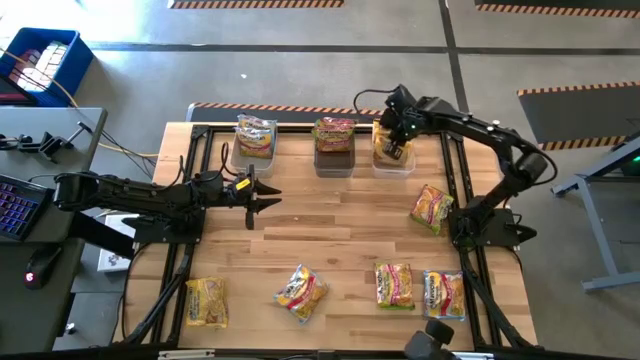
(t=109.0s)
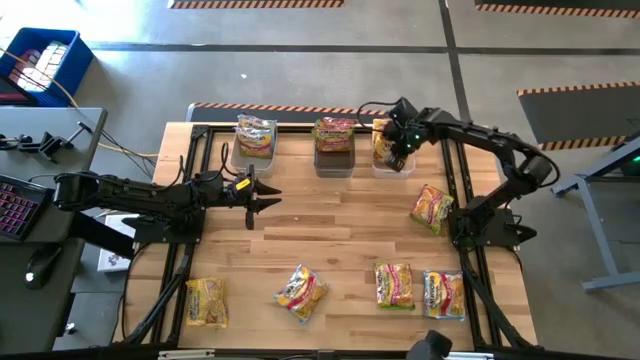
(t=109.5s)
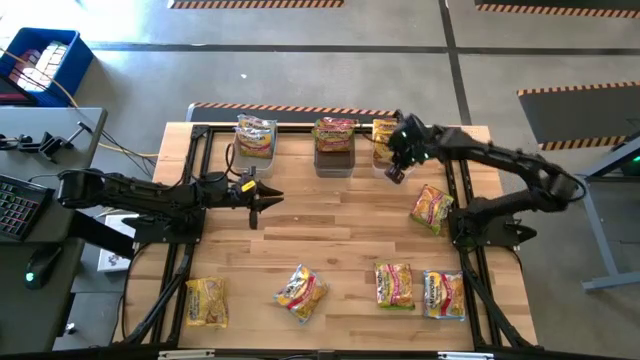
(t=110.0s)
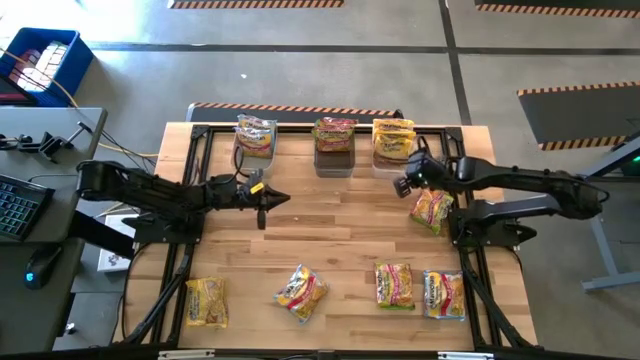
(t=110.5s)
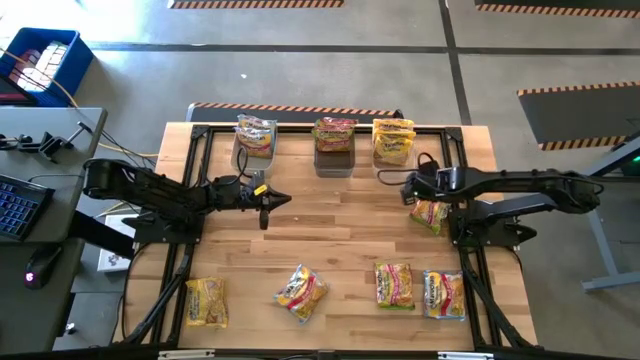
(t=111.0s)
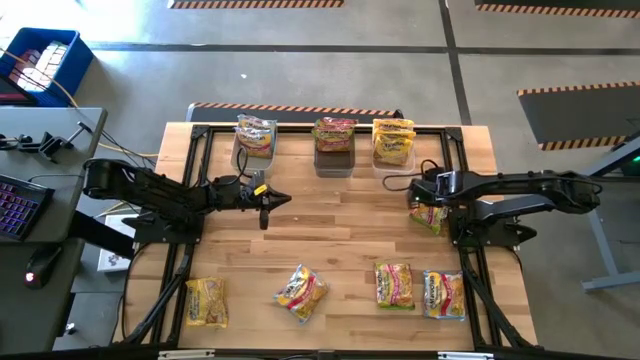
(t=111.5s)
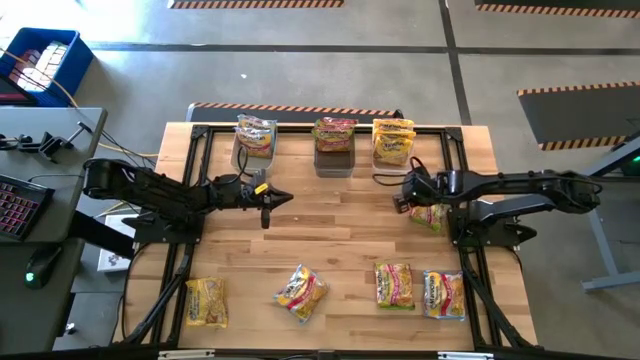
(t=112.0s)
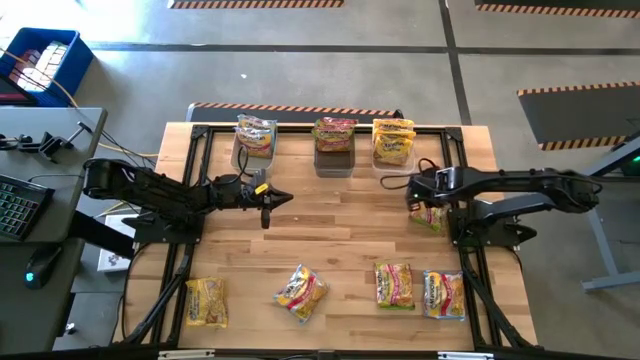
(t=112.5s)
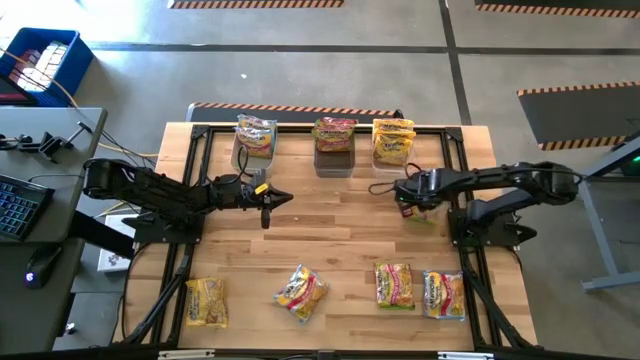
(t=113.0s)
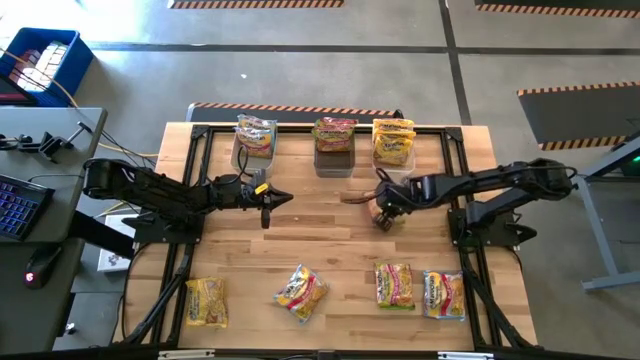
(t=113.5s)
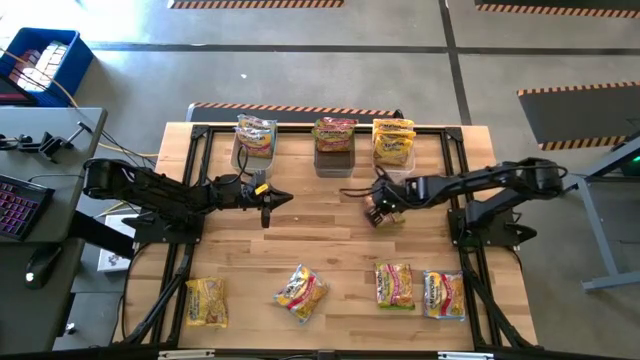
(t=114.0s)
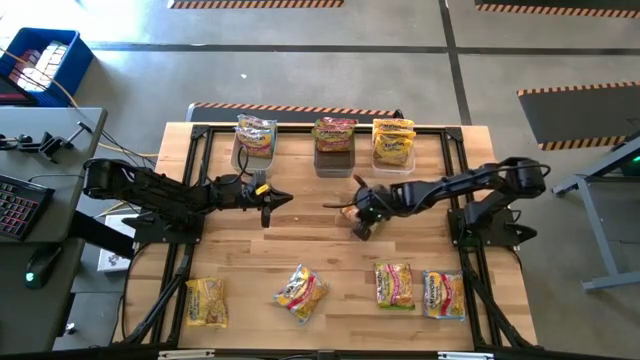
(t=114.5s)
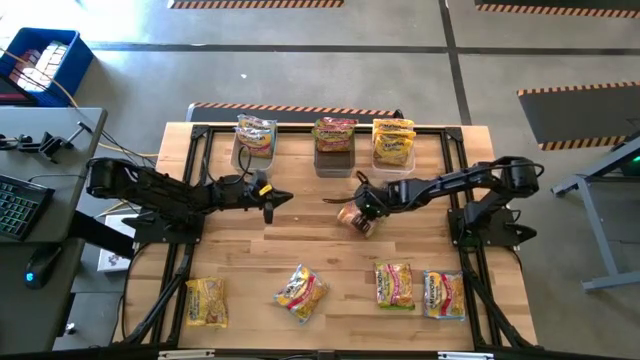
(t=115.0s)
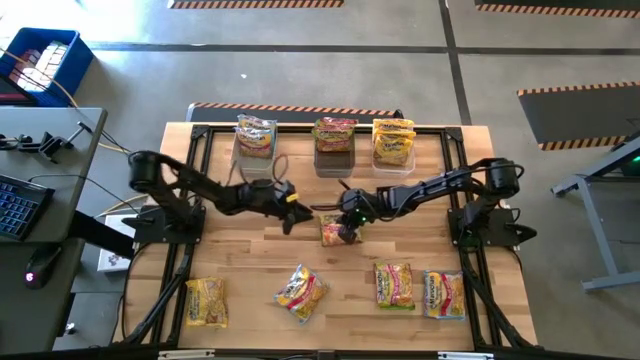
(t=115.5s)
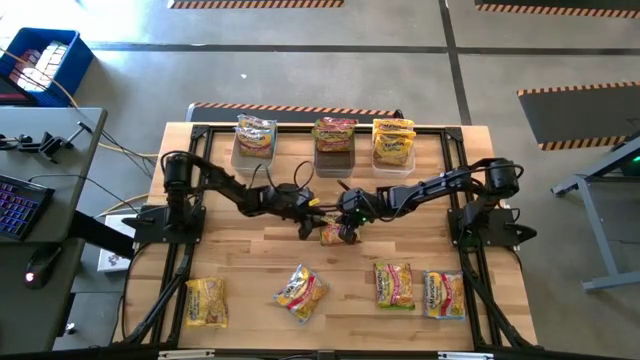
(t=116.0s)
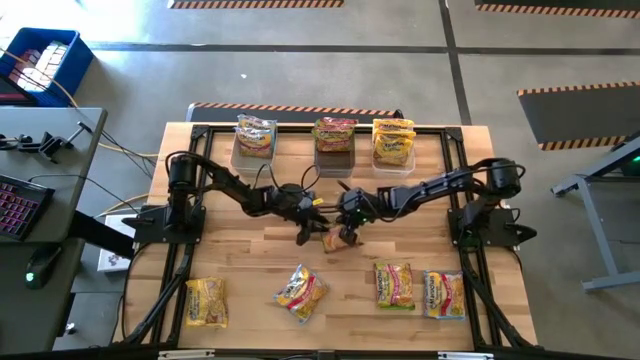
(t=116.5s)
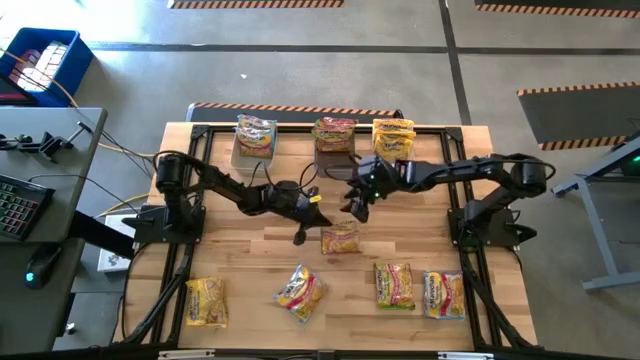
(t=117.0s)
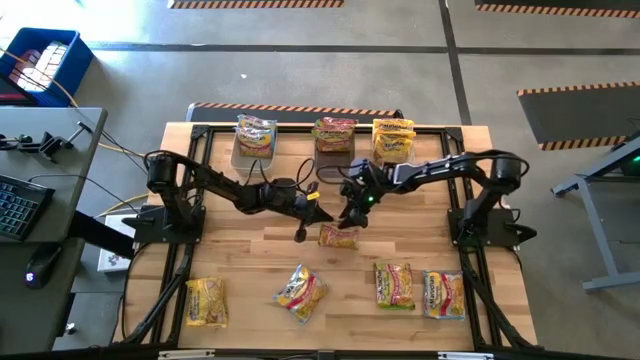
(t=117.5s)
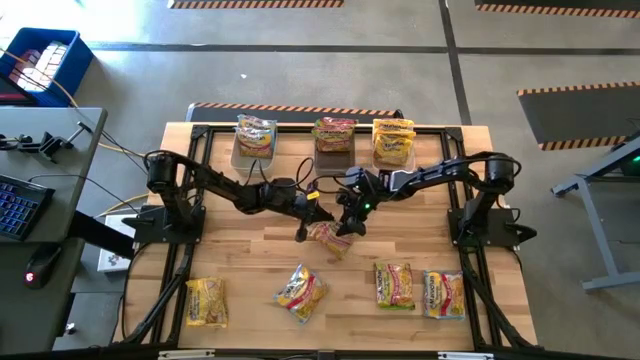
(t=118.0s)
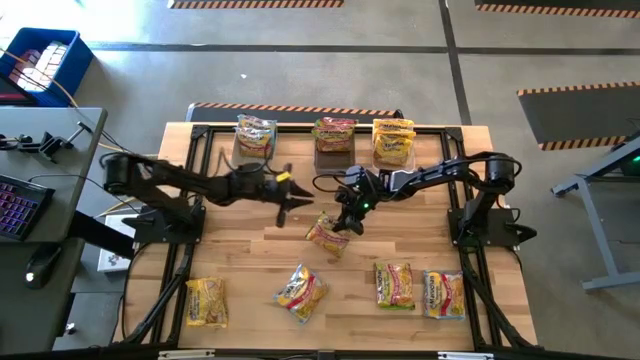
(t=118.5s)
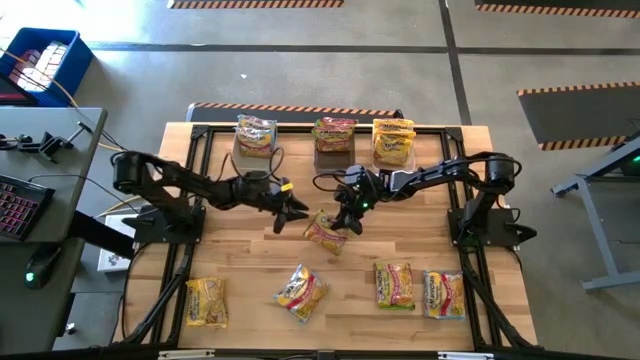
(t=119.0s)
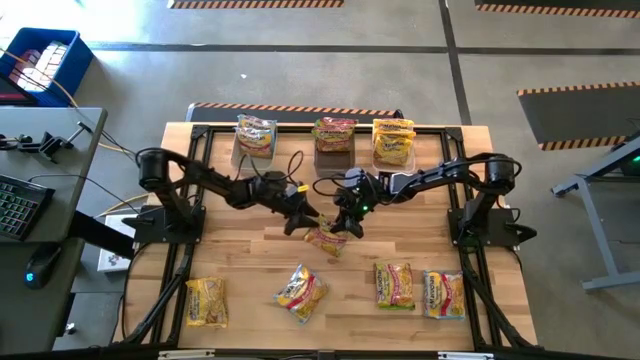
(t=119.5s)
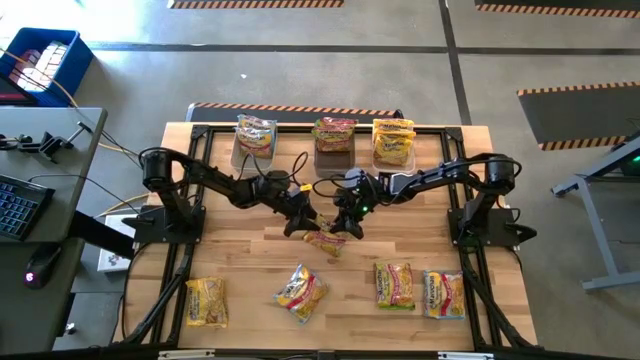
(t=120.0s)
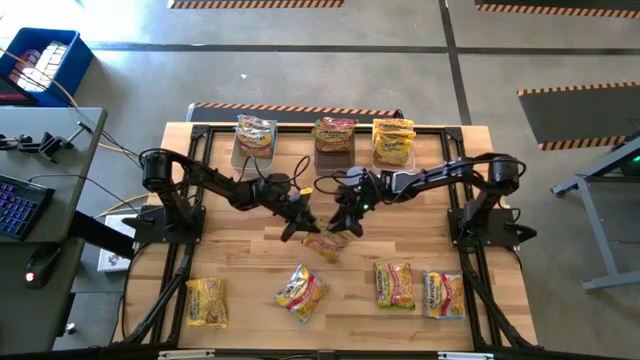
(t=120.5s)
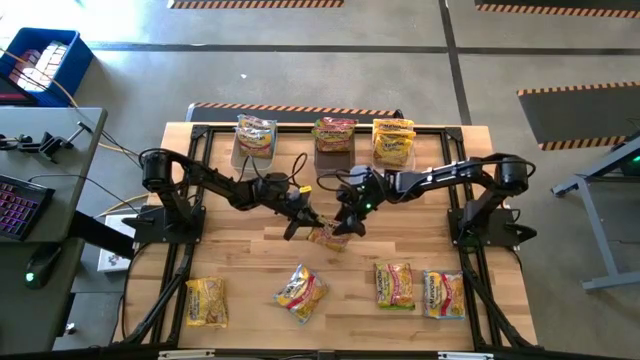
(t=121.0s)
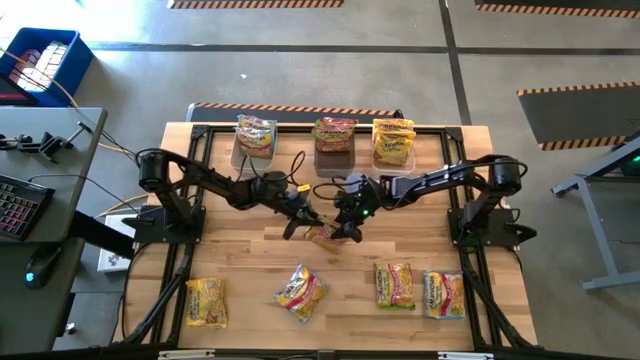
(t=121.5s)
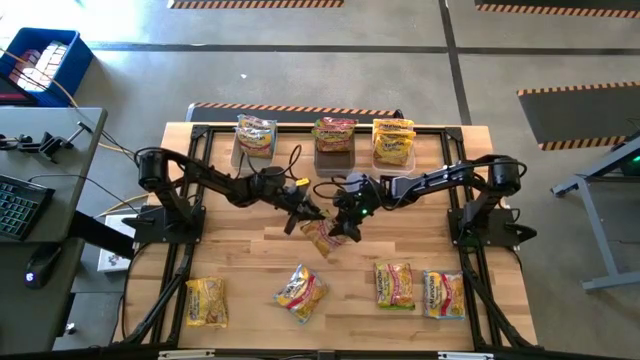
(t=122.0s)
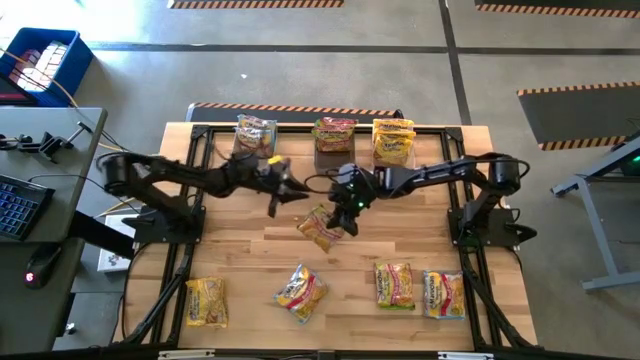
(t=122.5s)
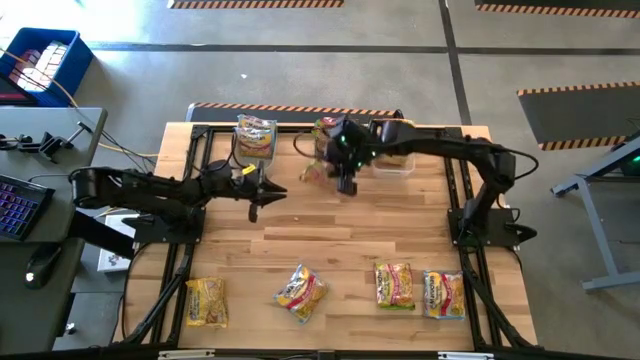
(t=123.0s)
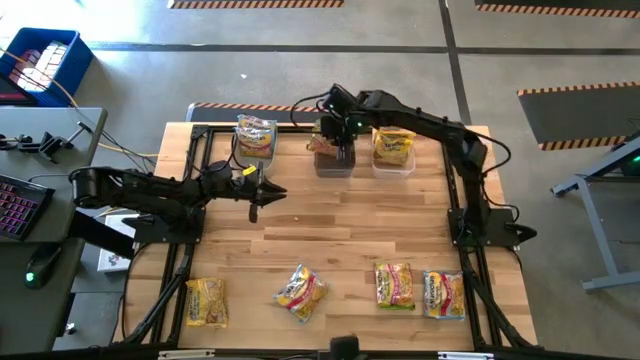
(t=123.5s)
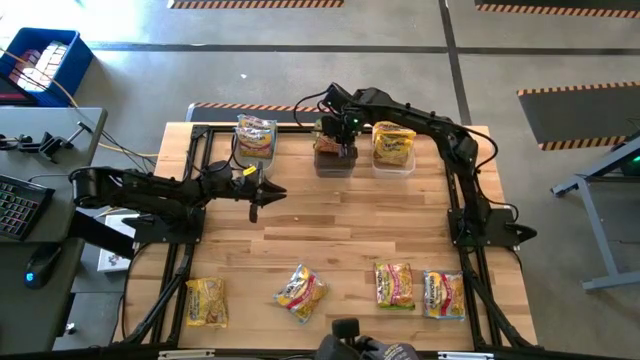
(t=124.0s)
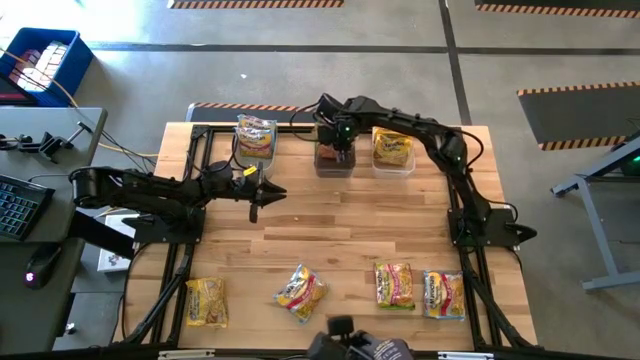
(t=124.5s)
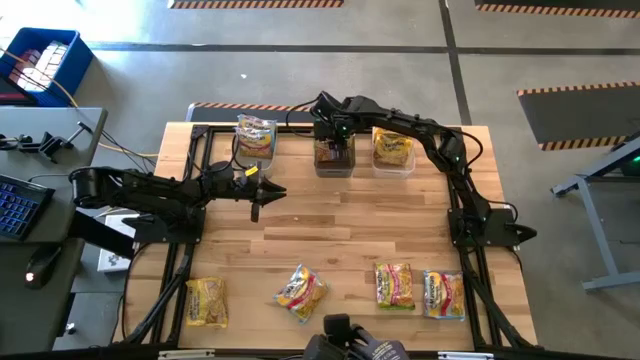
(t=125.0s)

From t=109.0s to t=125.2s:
Task: Sort Maruchan noodles
Put the green noodle pack into the black bin

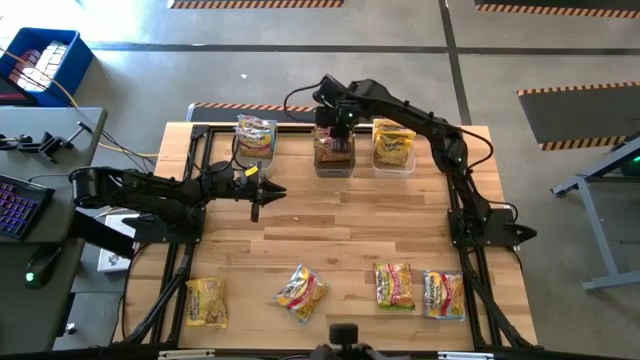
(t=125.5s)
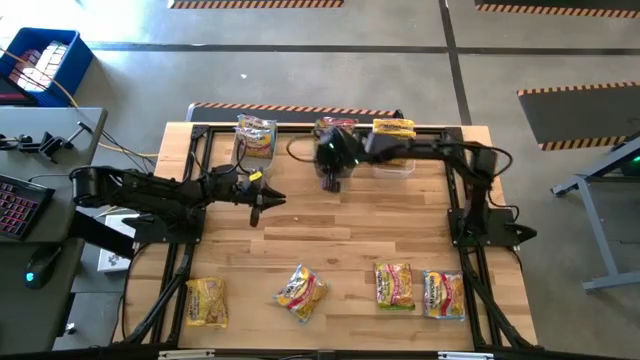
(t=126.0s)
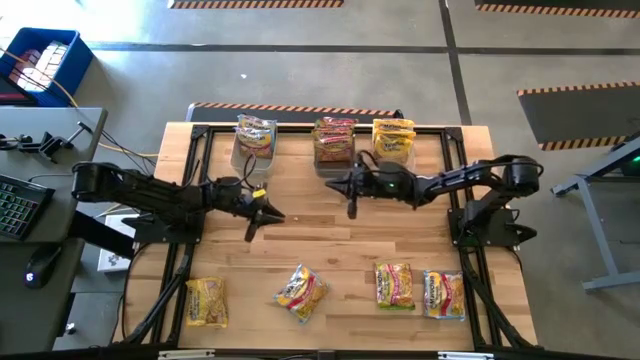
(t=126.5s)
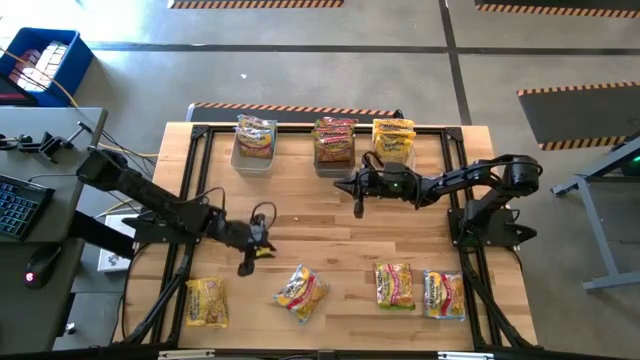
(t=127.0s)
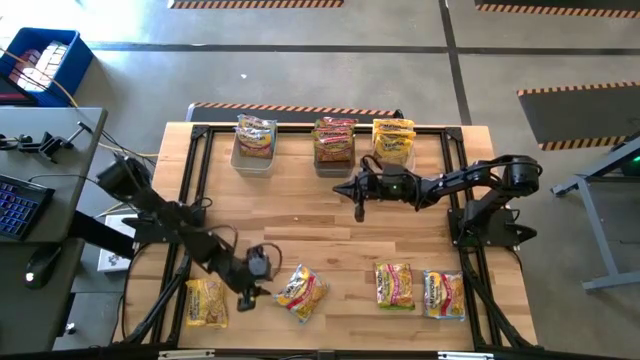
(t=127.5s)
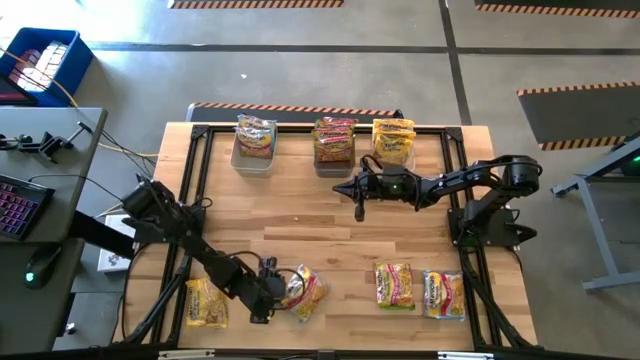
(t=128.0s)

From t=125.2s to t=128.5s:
Put the blue noodle pack into the gray bin

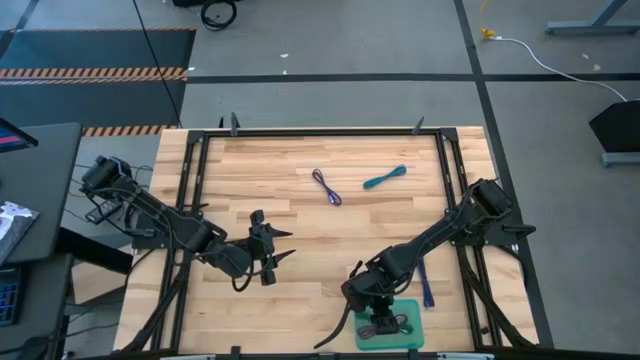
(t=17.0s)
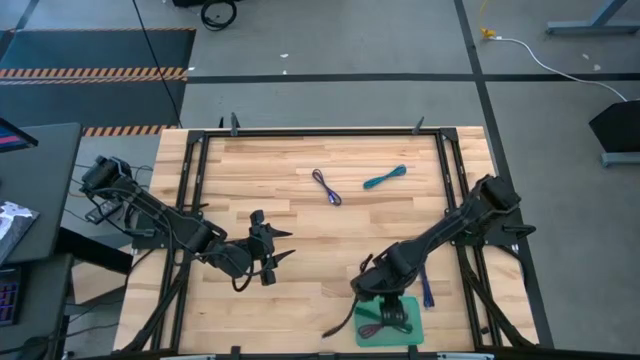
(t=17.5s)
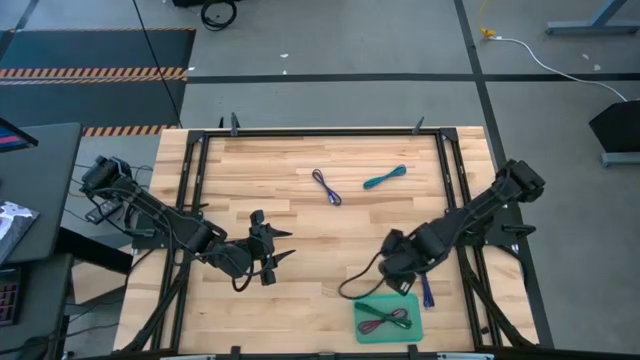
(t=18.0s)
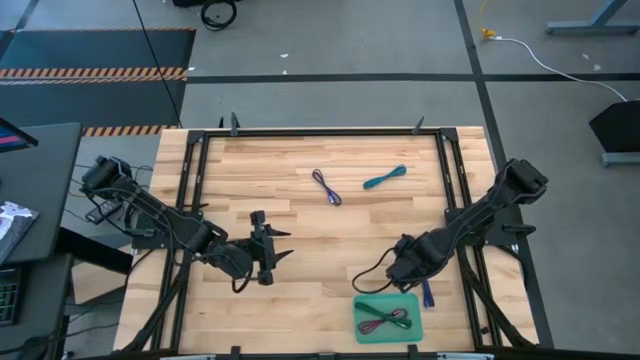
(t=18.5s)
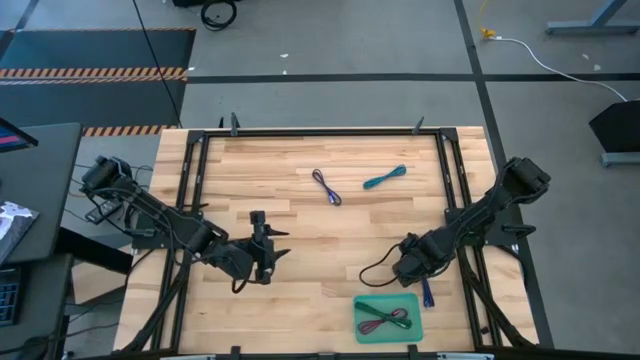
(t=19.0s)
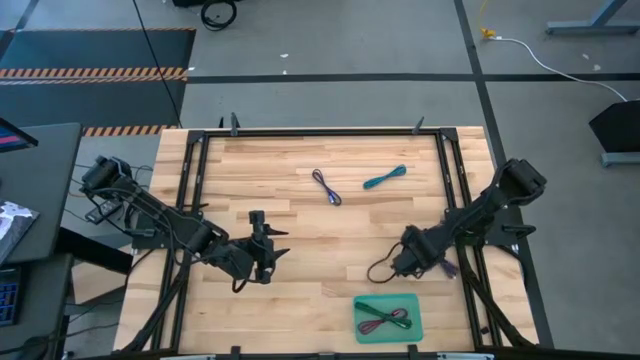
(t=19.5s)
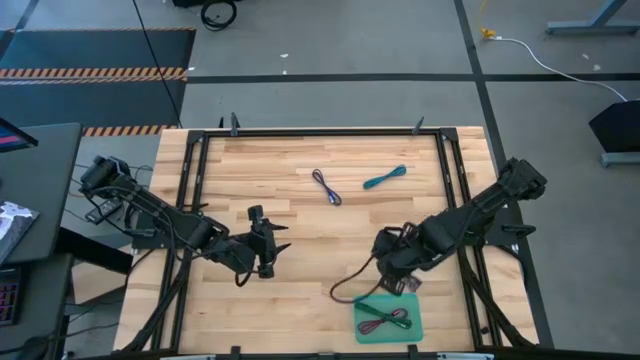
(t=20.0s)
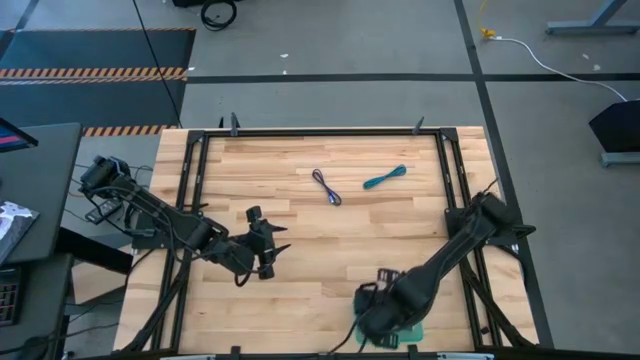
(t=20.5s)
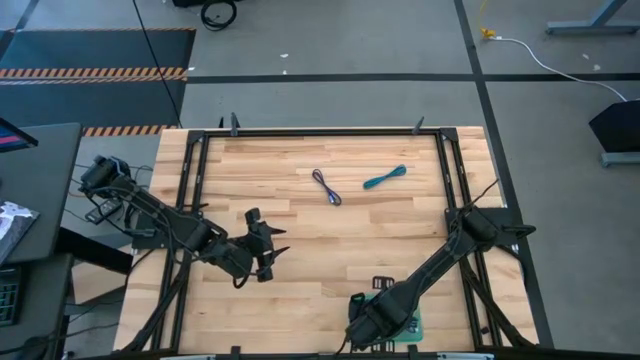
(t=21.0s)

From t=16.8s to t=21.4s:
Task: Pick and place USB-C Cables
Put the purple charger cable into the blue bin
